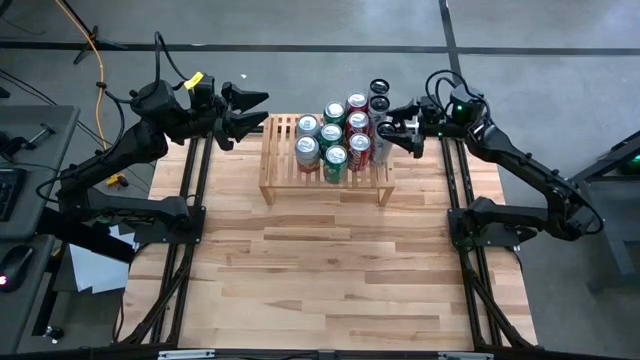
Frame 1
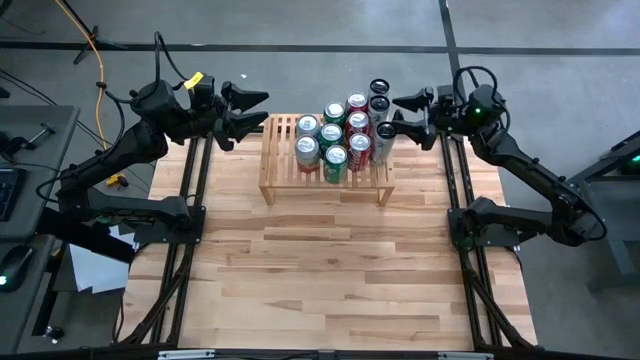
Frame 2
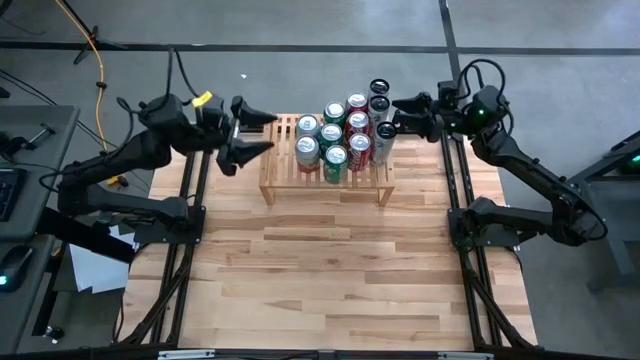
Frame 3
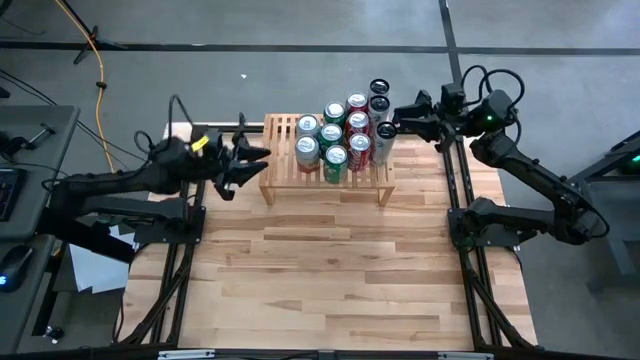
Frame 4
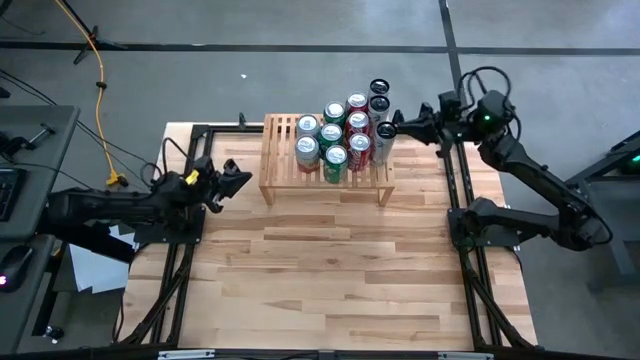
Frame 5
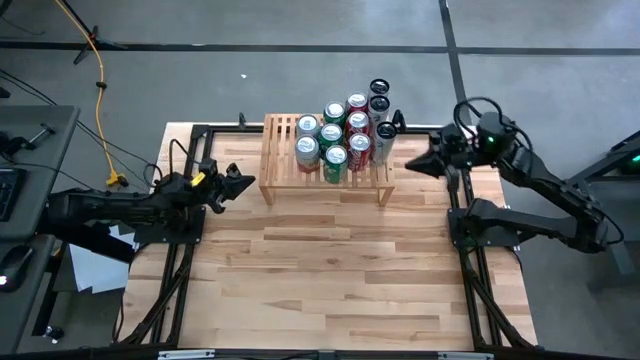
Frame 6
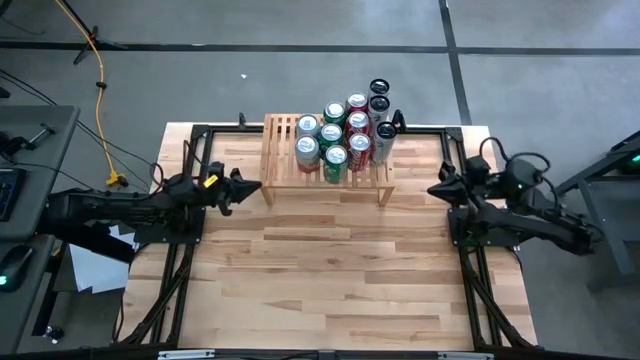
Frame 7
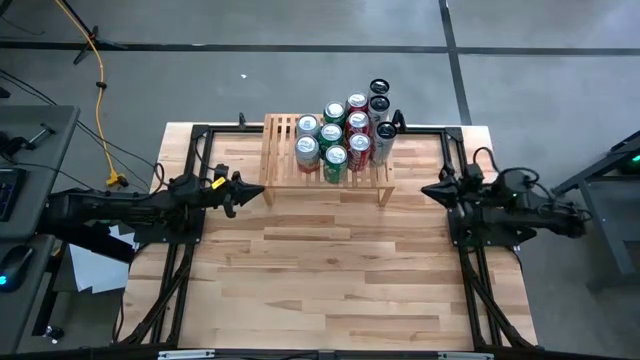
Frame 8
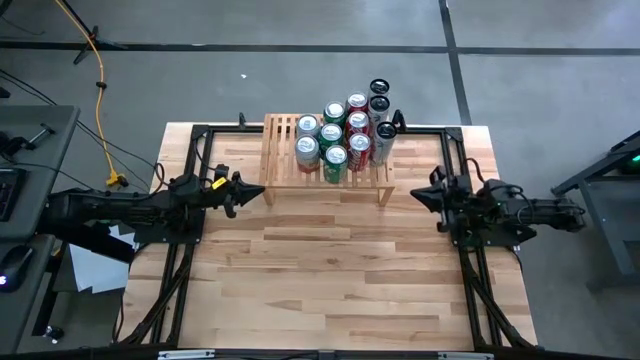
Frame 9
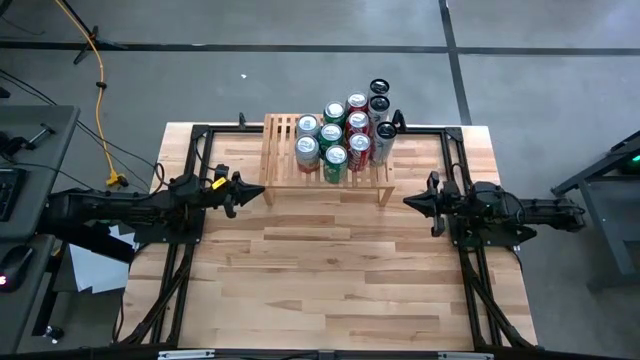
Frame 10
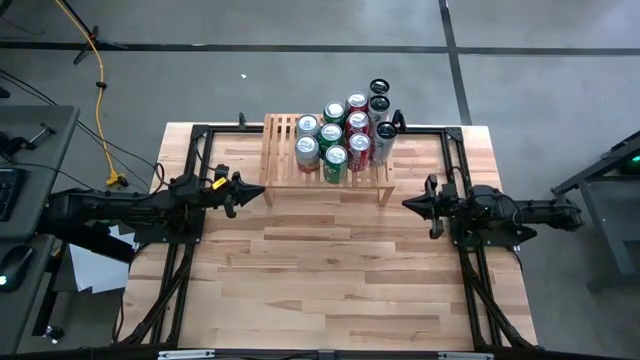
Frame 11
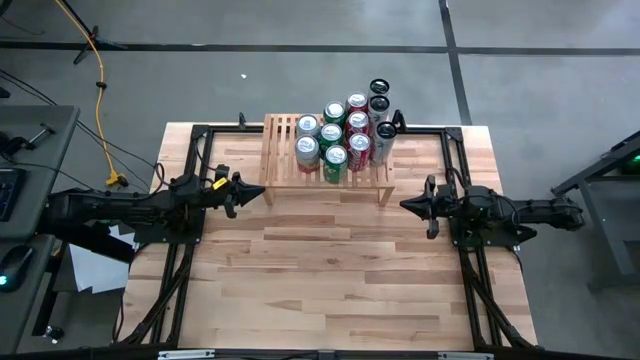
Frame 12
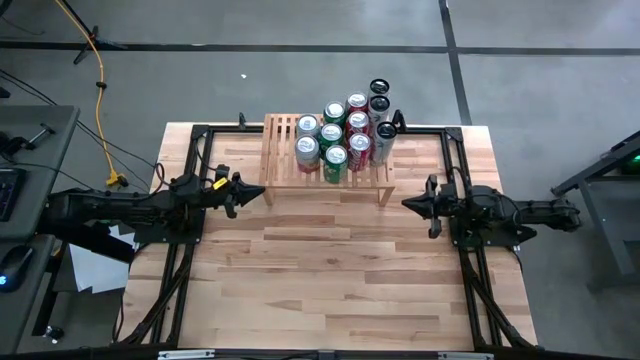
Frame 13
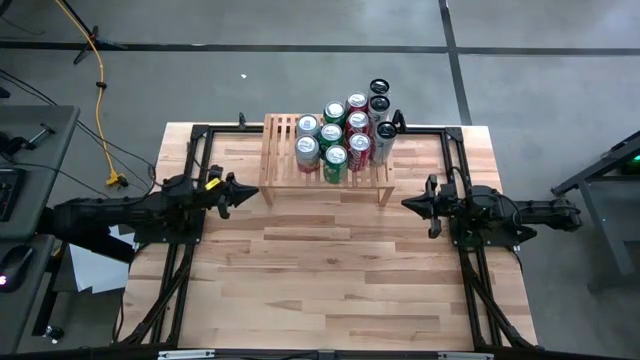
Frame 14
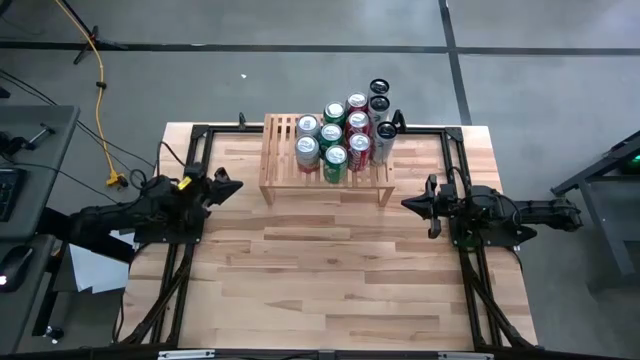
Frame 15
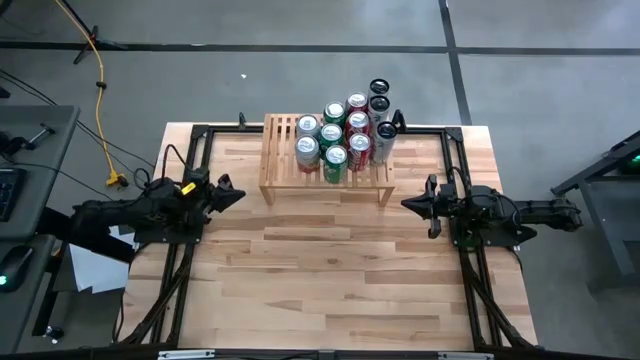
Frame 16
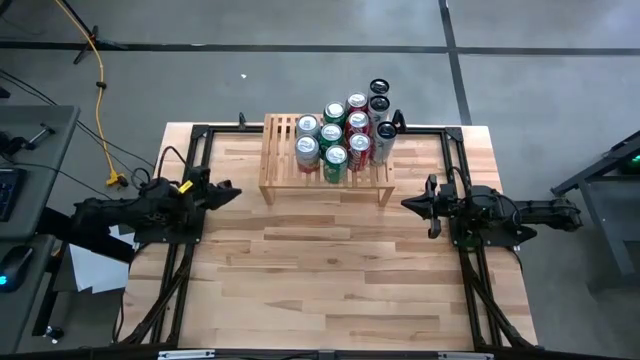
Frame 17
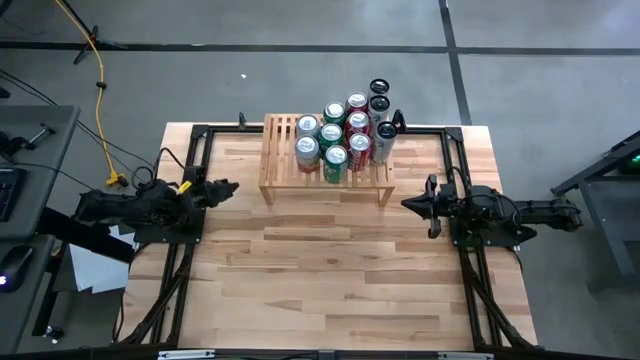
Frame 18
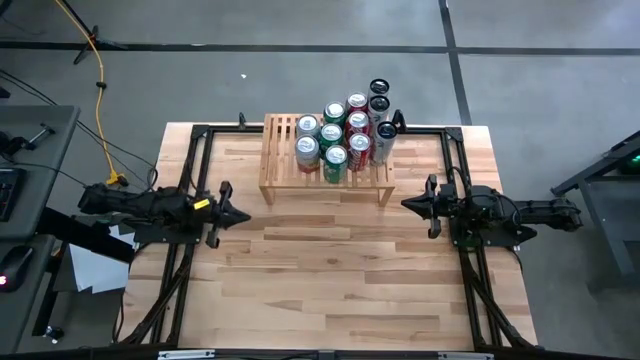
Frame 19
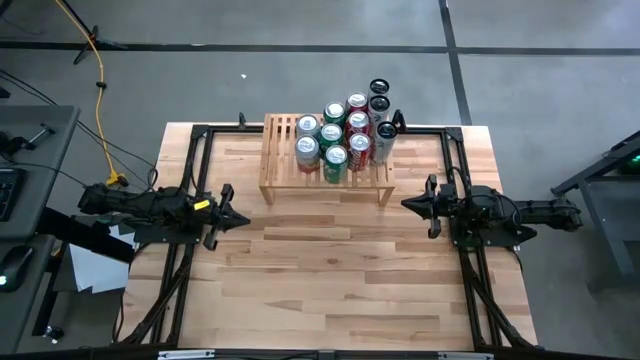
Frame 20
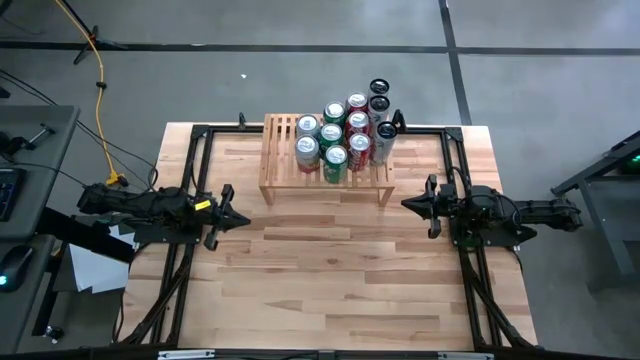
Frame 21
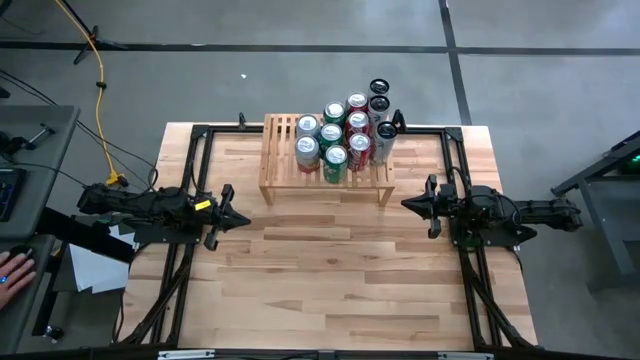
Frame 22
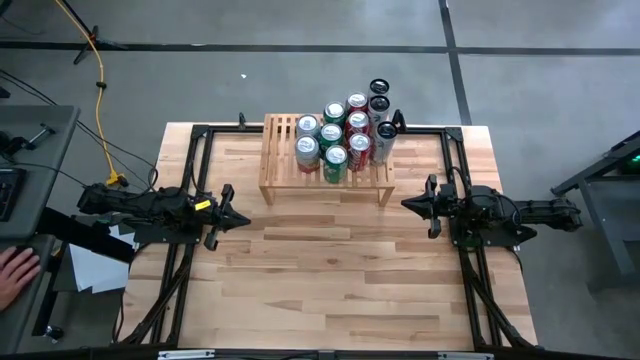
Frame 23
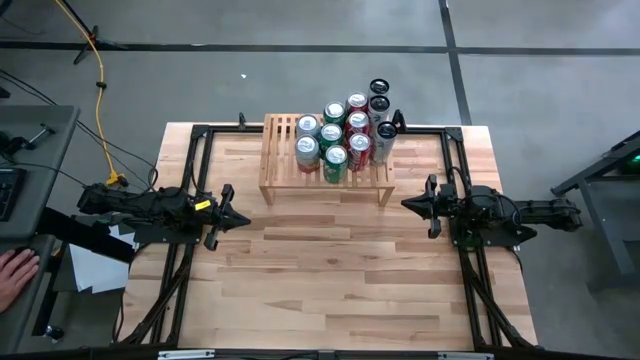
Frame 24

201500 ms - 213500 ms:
Task: Place canned beverage on shelf
Return to Home Position

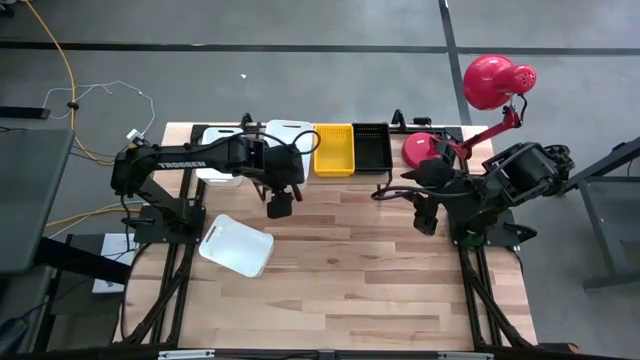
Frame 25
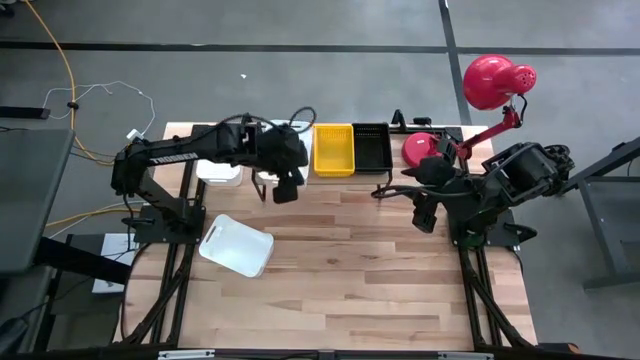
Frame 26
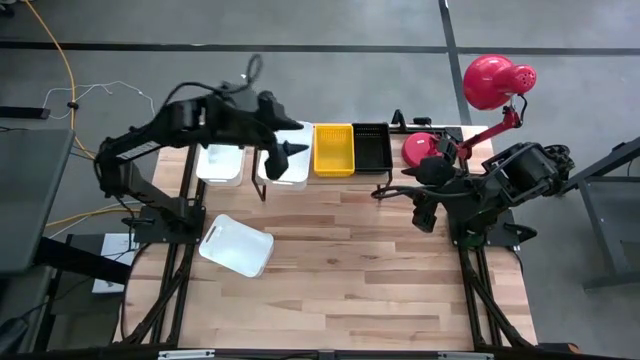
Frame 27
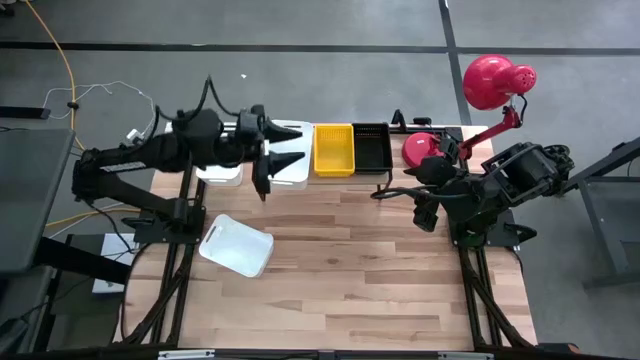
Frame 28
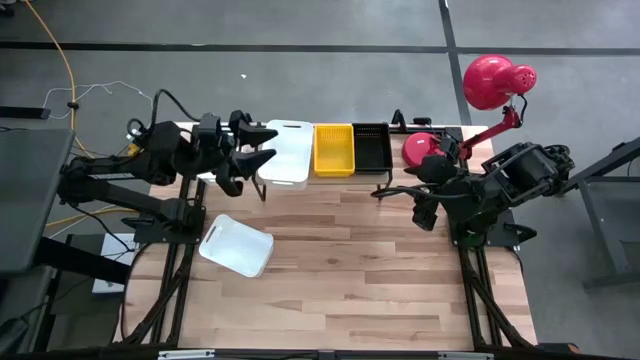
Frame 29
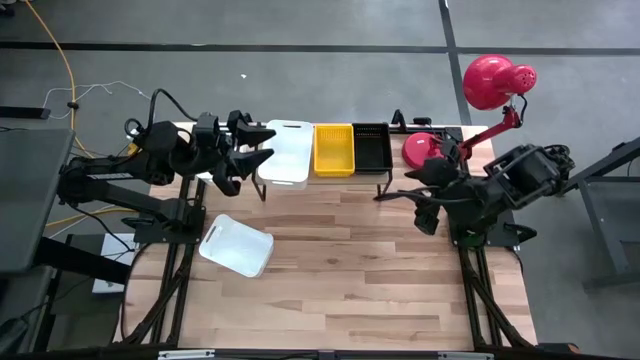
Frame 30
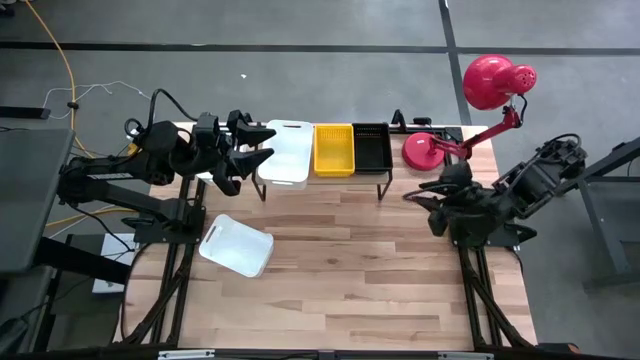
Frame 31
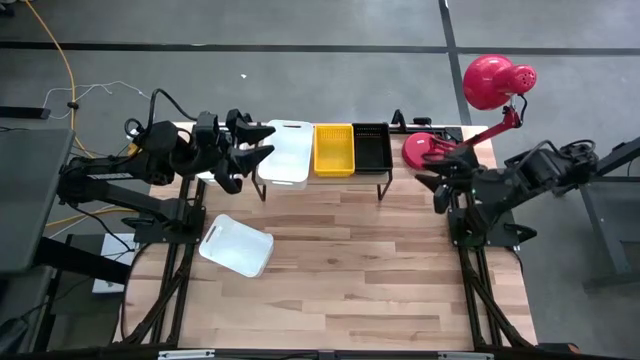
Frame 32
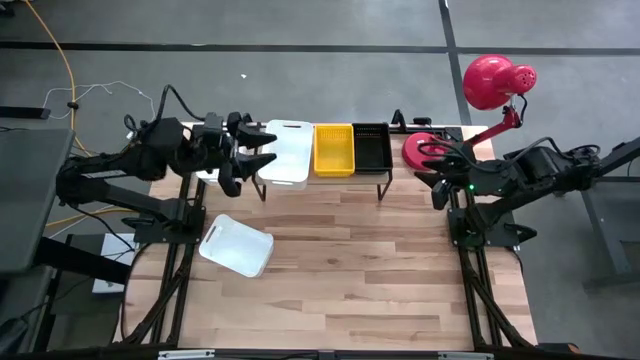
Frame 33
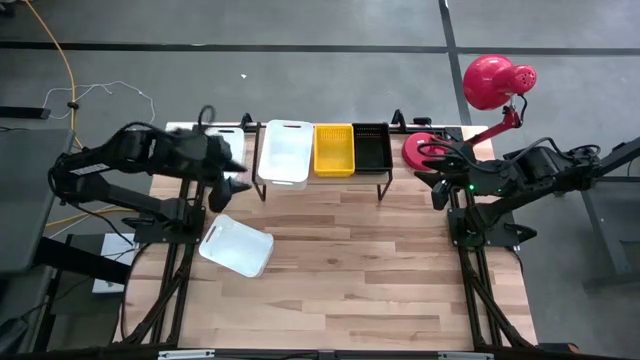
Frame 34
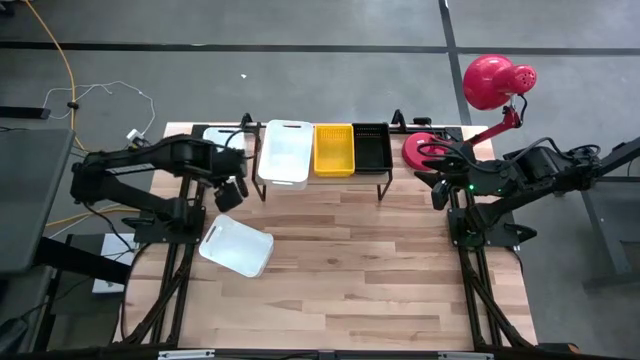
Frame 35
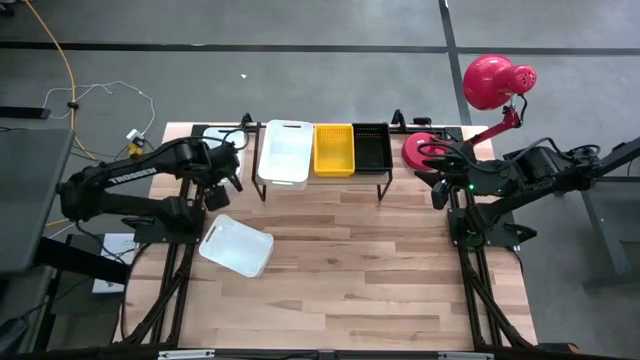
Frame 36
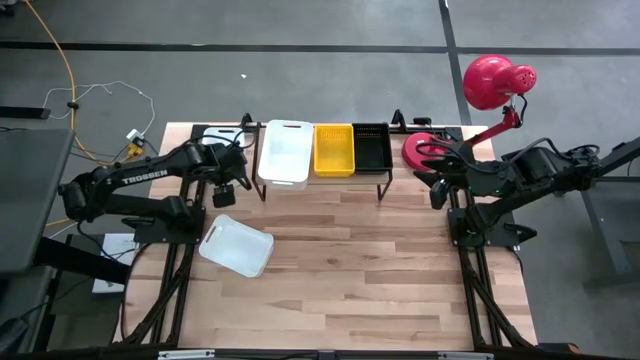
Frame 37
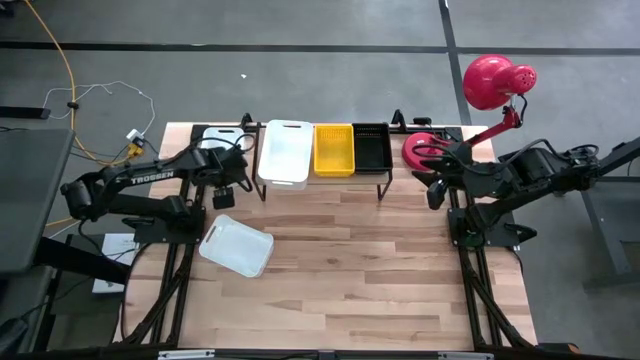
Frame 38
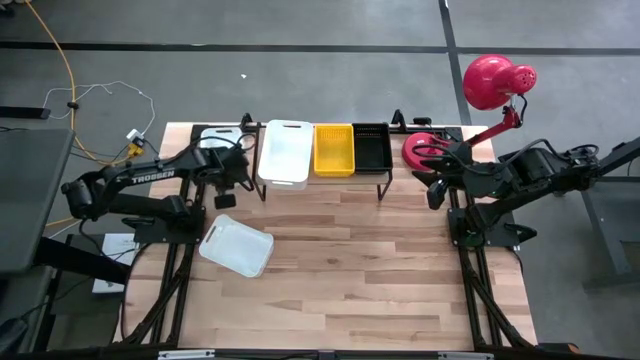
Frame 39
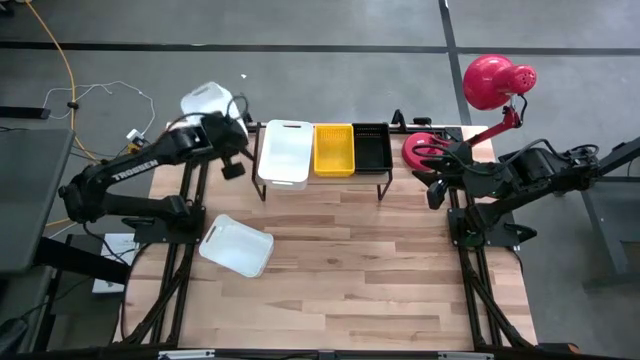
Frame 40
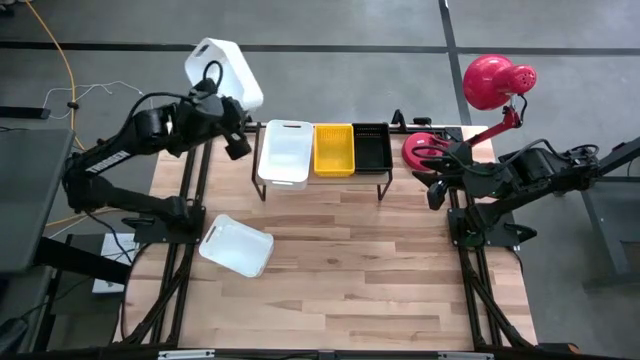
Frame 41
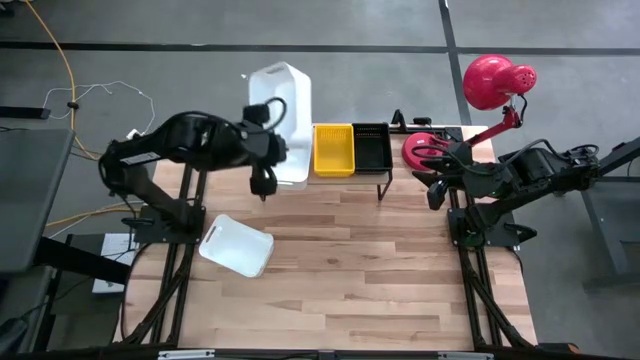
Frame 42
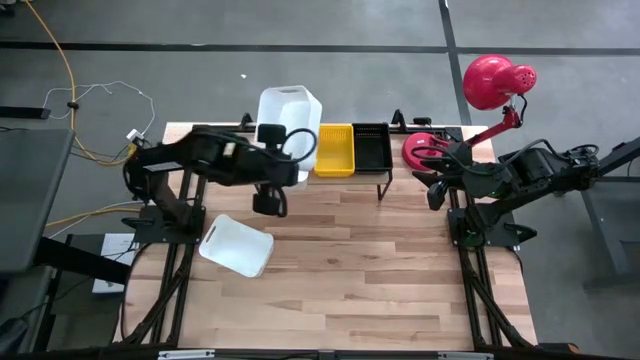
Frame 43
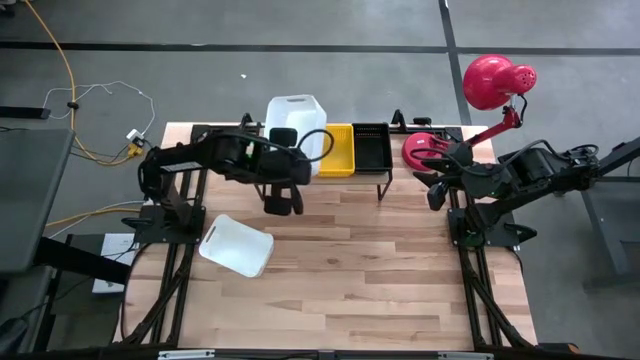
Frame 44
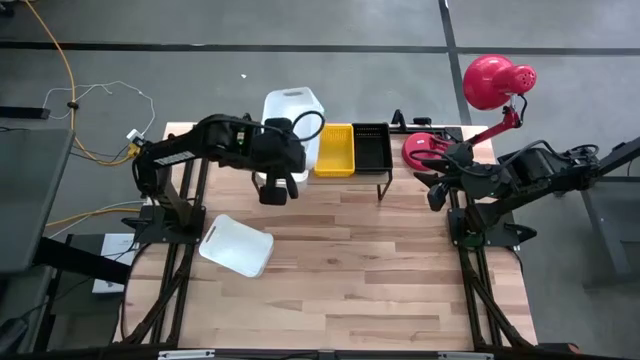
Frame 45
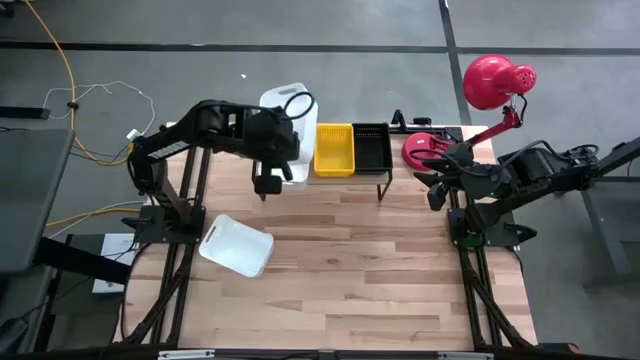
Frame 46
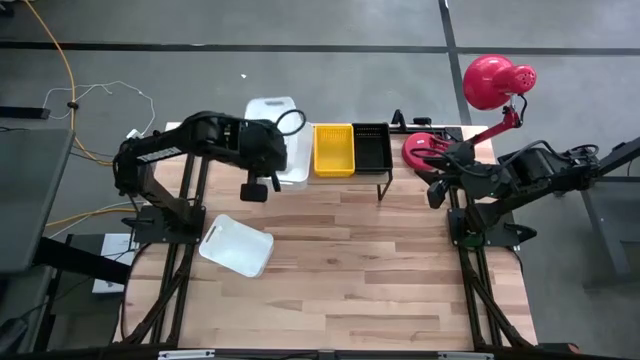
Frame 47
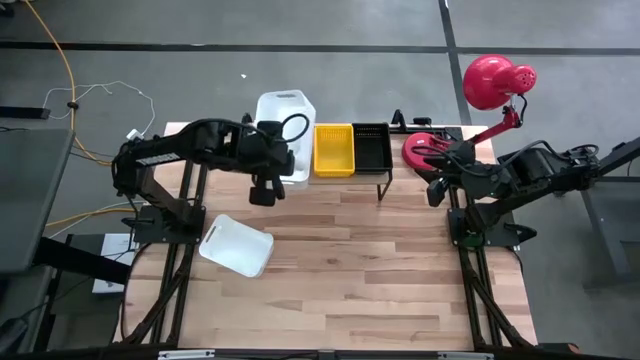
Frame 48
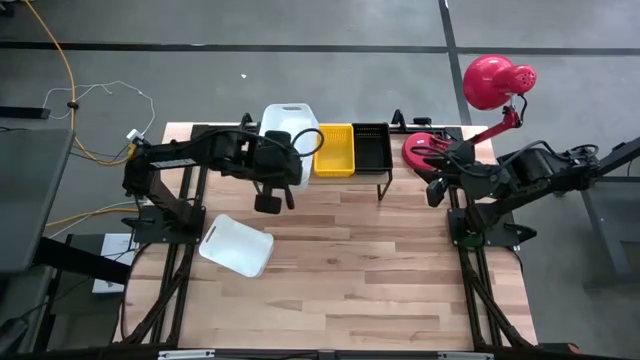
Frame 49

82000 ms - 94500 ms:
Task: Stack baskets on shelf by color
Stack the top white bin into the white bin on the shelf
